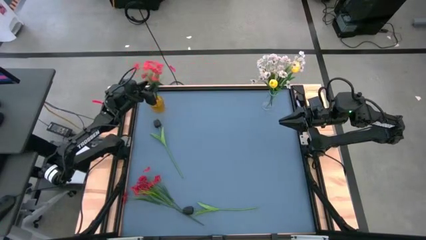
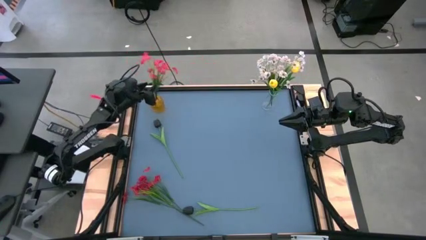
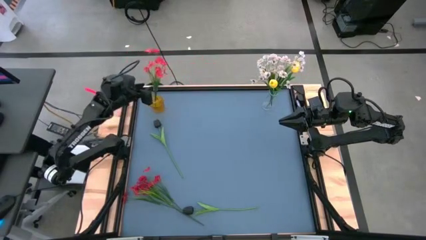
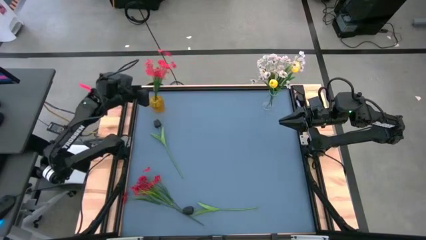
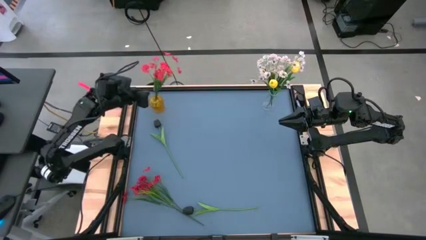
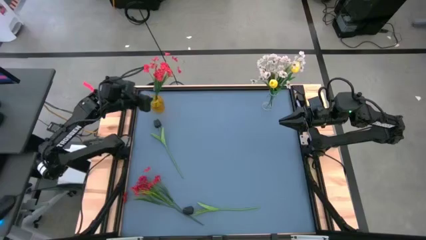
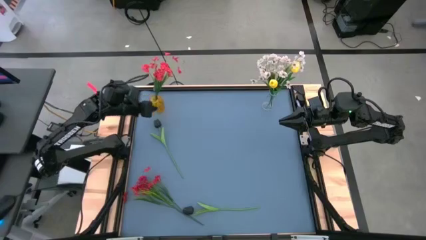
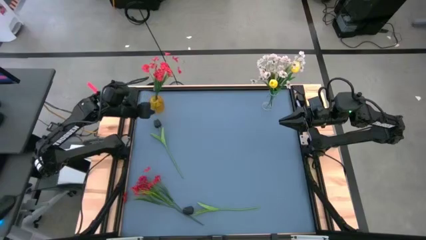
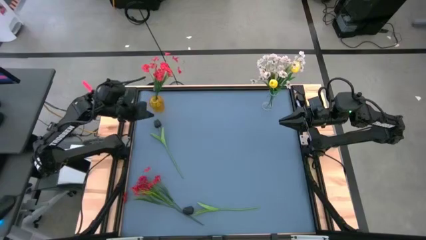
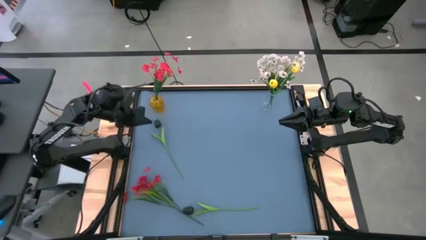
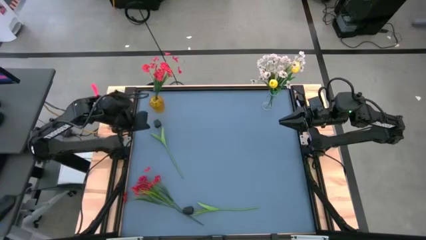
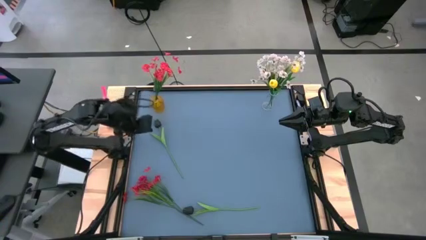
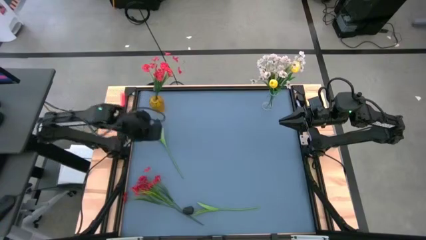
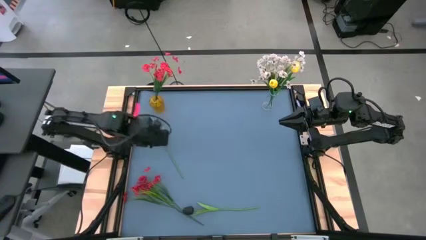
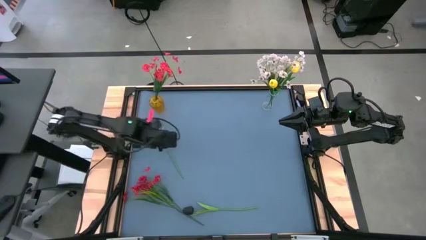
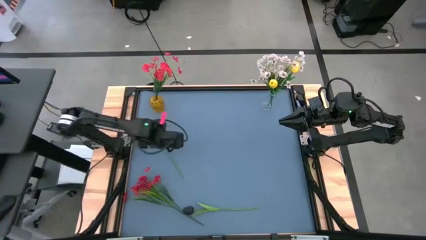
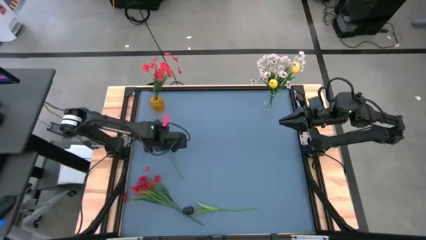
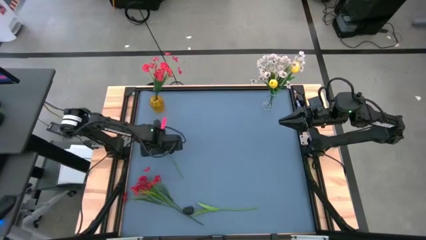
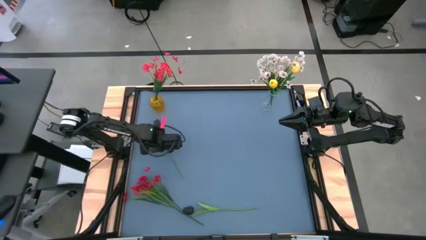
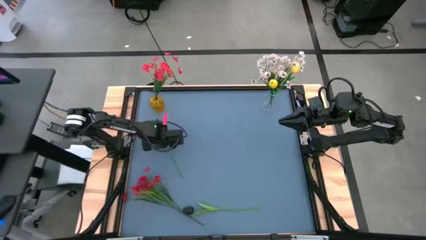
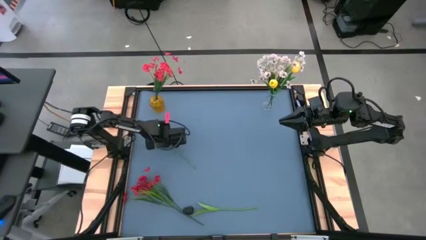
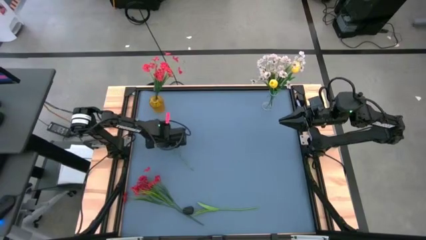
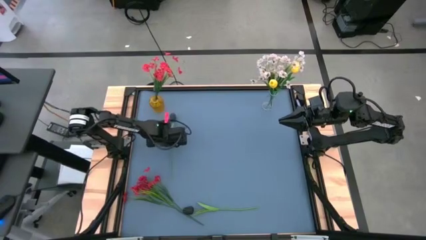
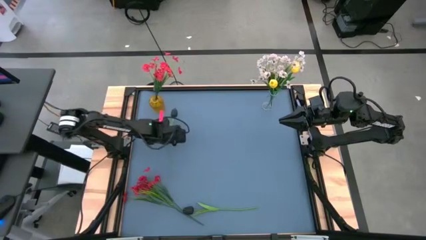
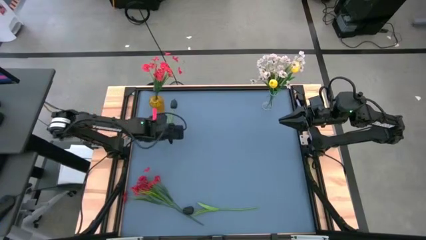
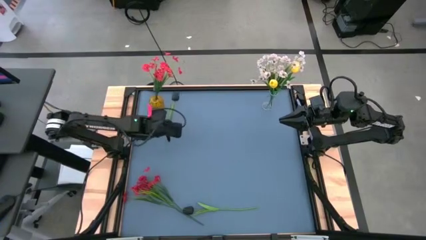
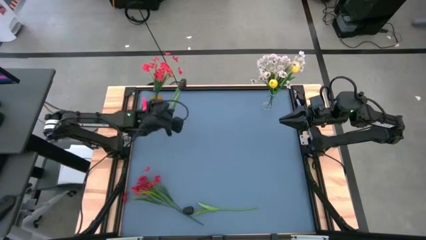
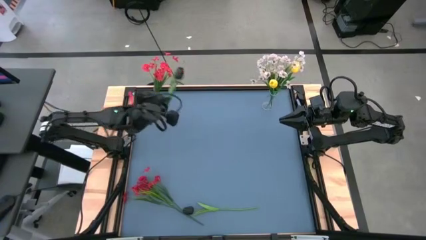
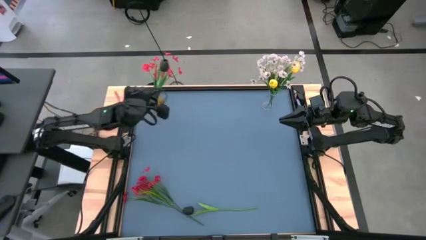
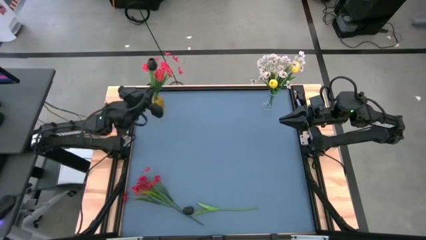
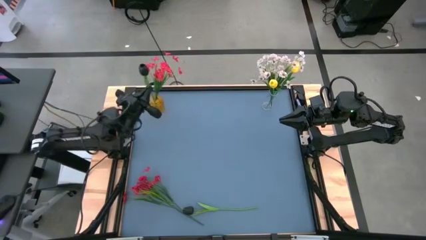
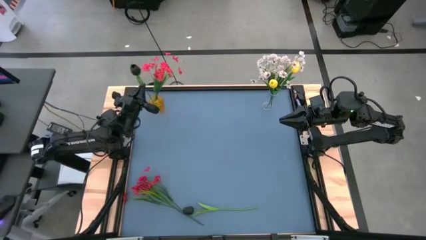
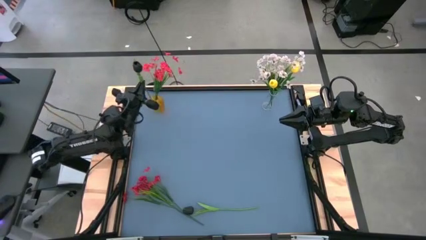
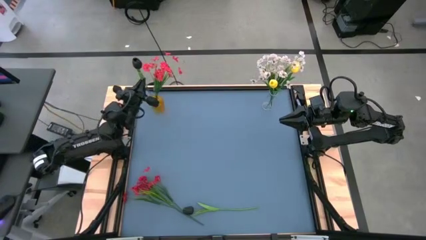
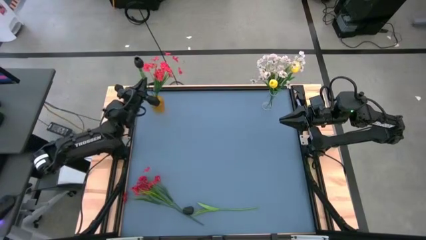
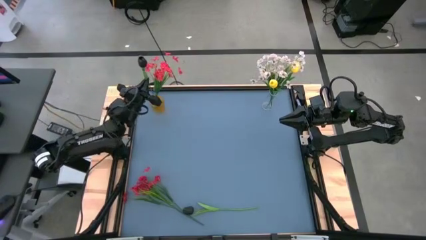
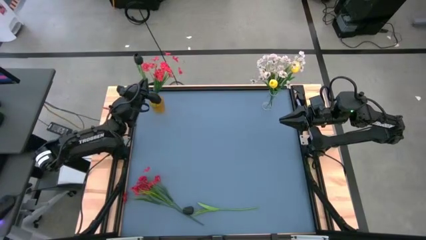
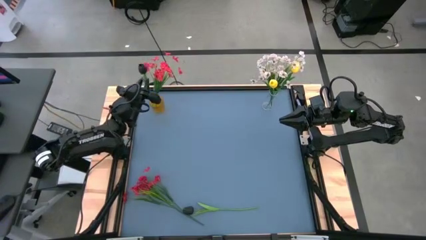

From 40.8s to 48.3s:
Task: Sort flowers into vase by color
Put the top black tulip into the yellow vase

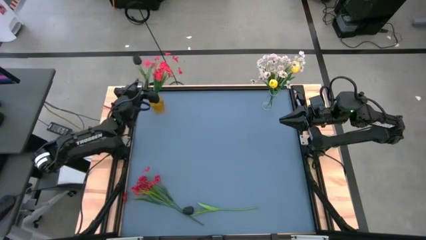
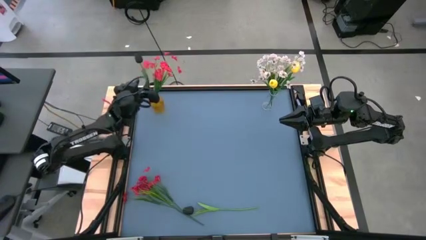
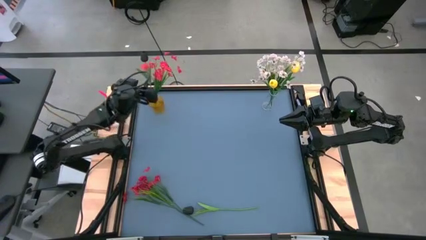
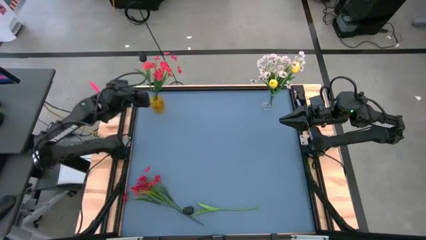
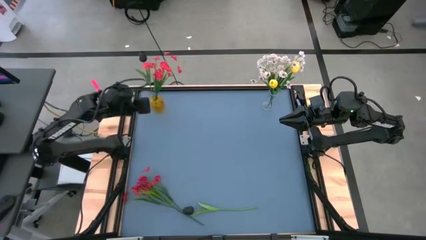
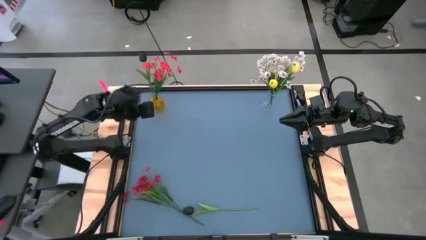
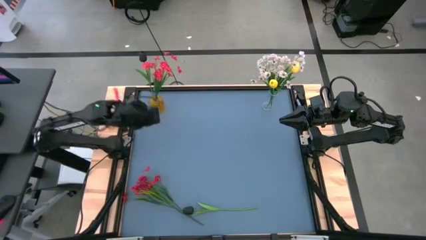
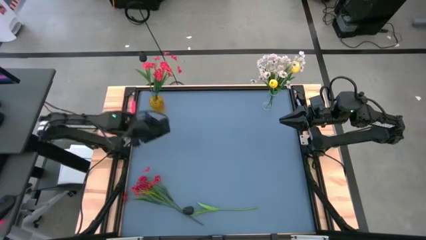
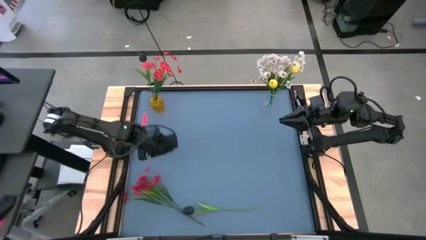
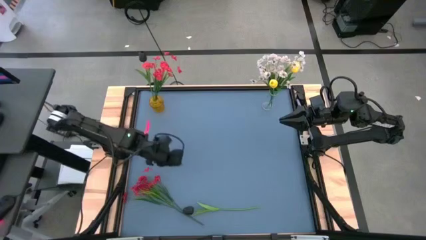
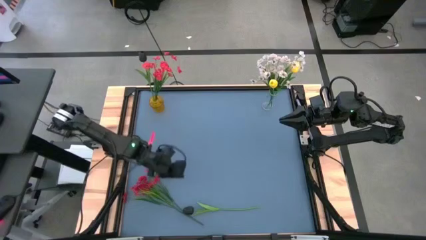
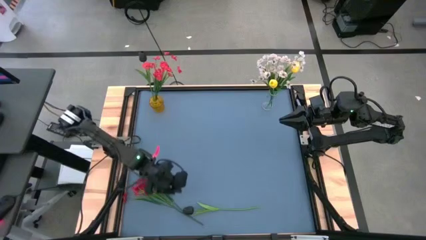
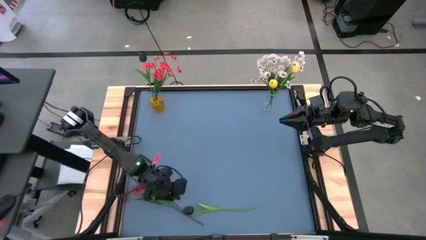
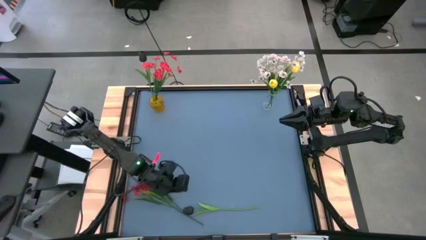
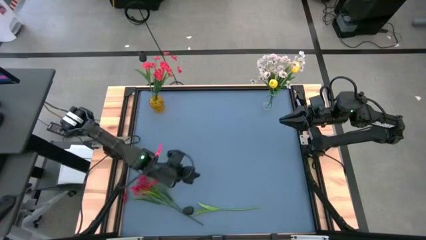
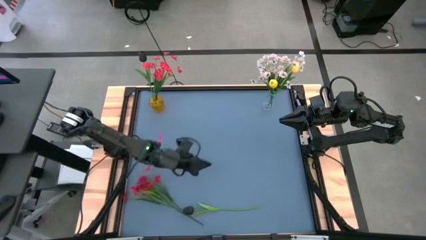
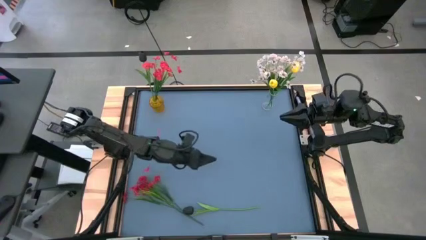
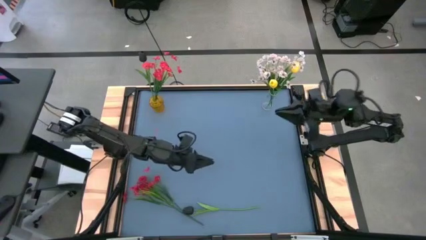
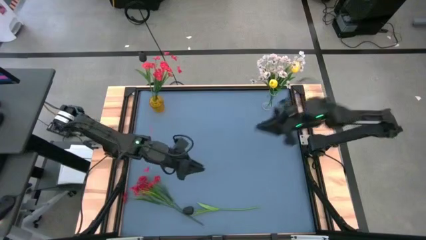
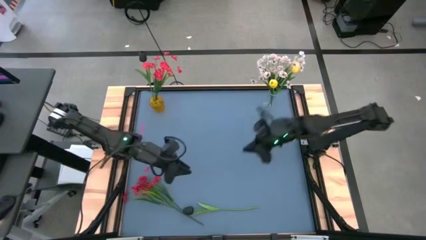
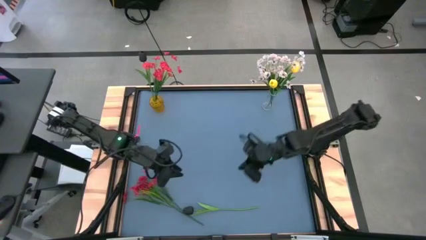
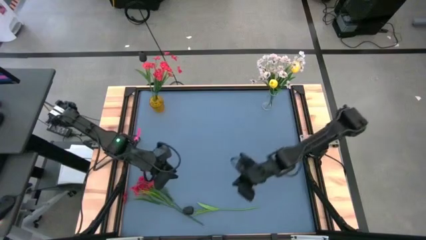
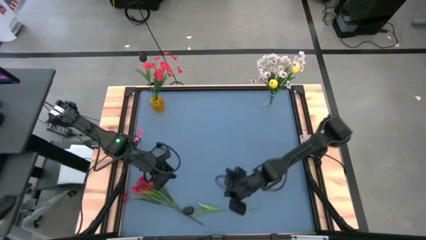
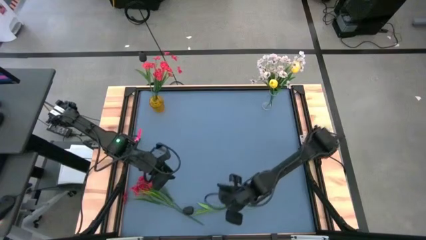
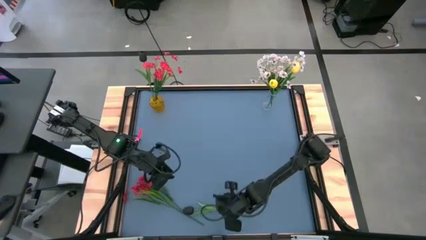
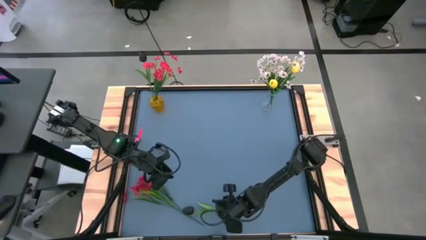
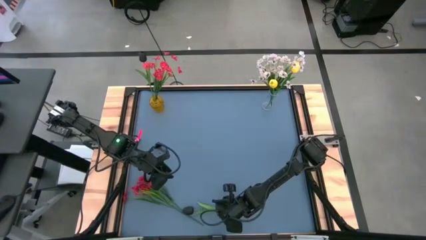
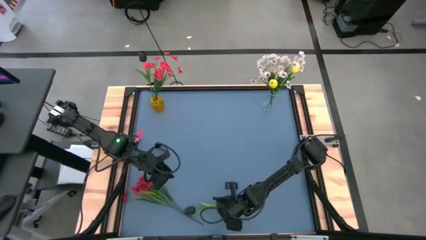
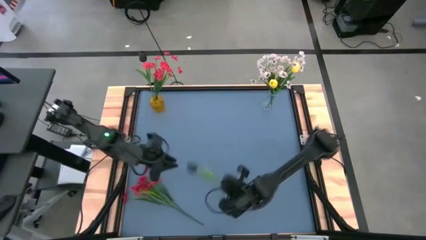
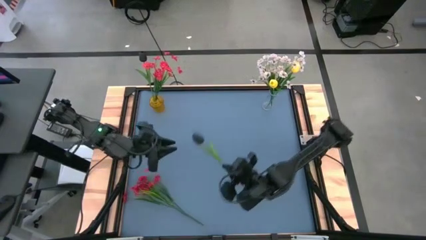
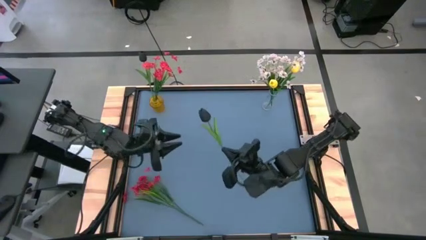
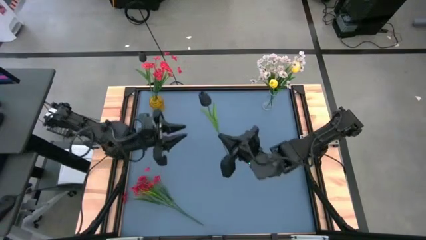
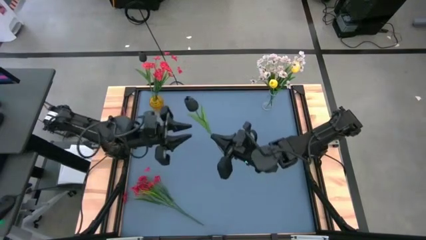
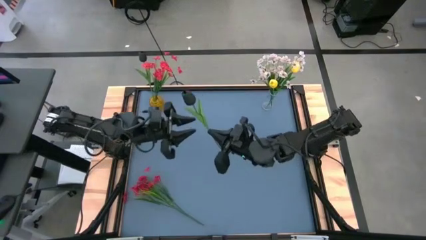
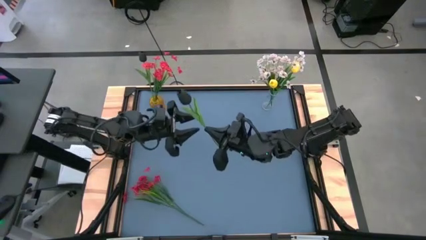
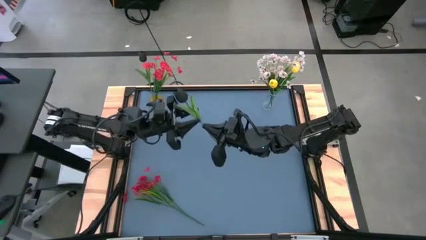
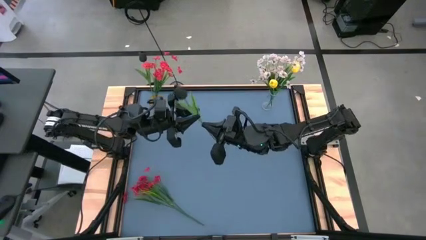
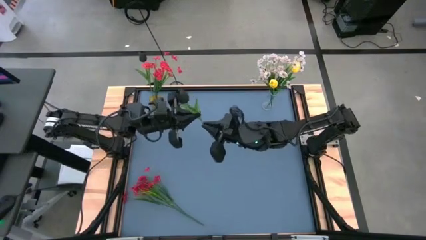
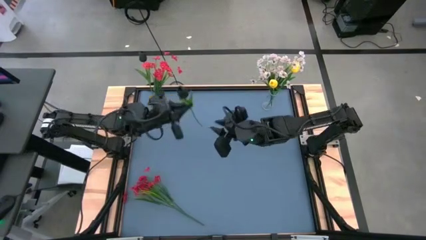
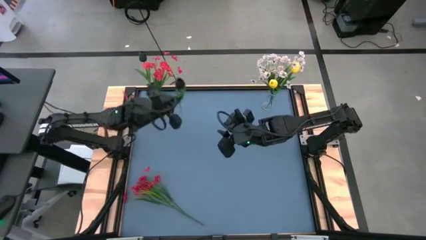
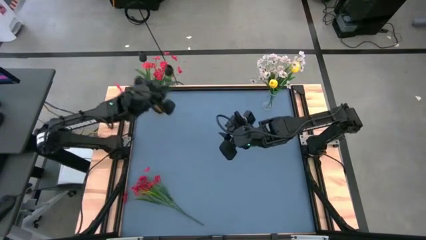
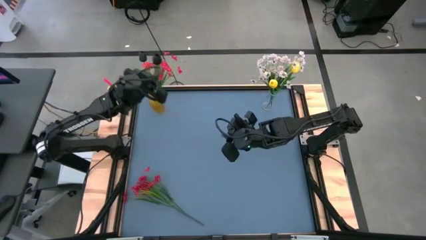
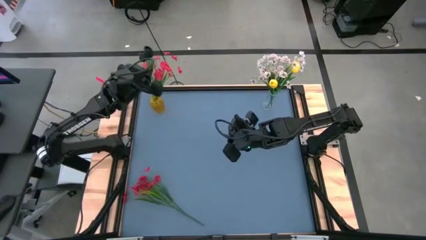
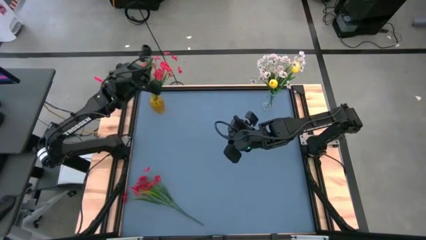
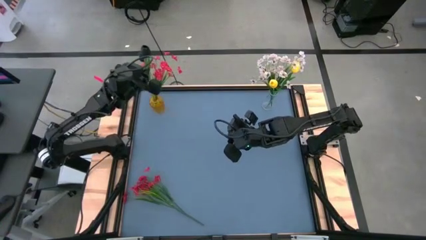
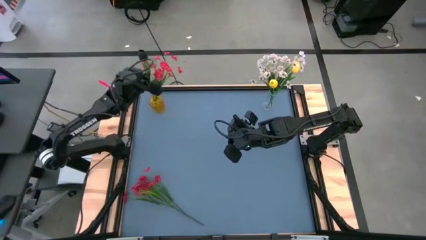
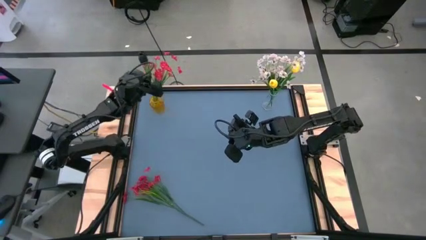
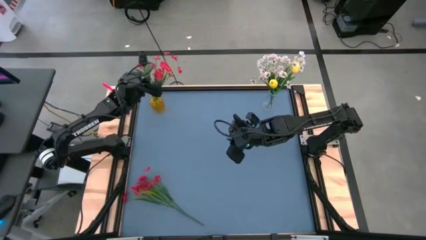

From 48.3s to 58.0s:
Put the black tulip into the yellow vase
